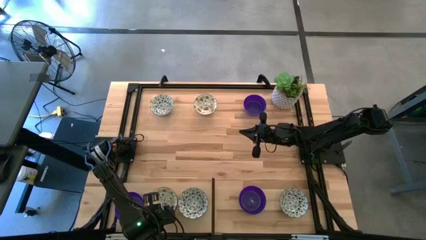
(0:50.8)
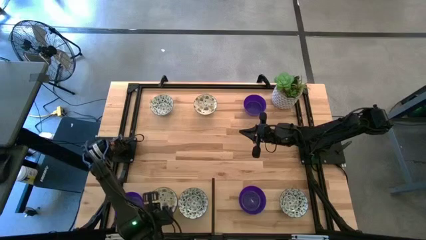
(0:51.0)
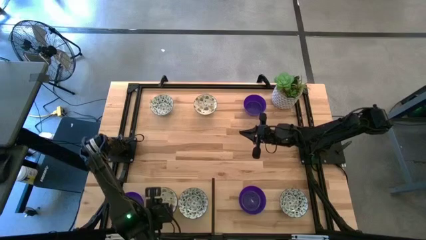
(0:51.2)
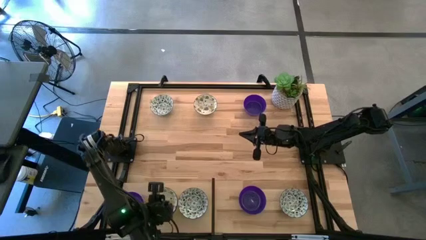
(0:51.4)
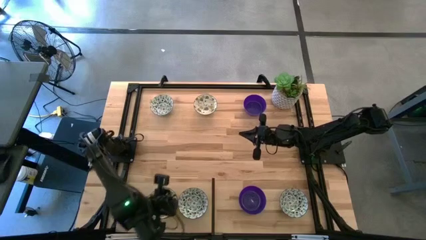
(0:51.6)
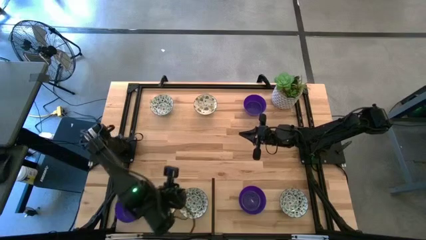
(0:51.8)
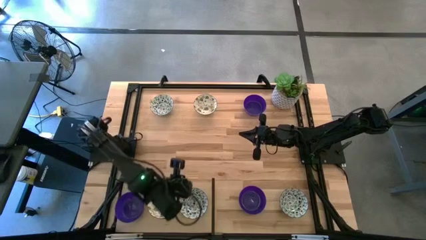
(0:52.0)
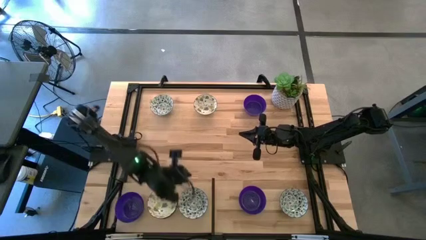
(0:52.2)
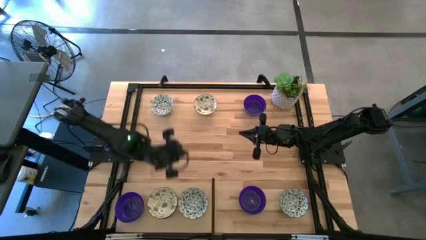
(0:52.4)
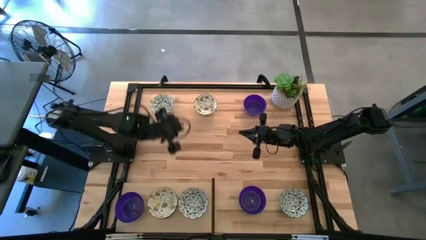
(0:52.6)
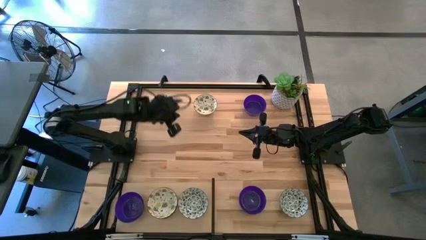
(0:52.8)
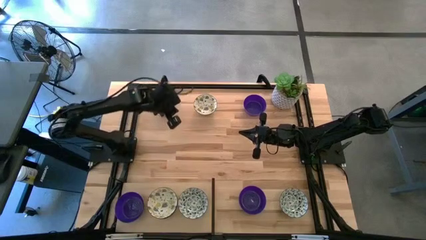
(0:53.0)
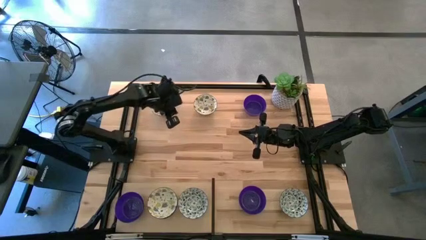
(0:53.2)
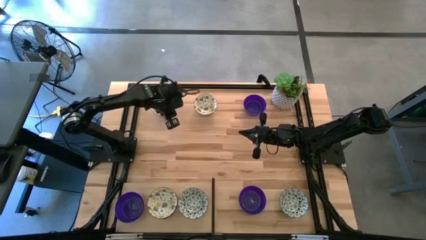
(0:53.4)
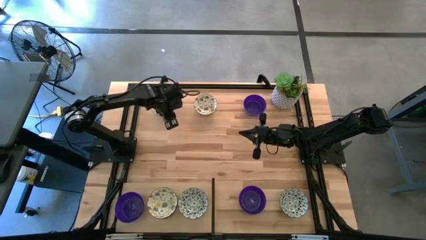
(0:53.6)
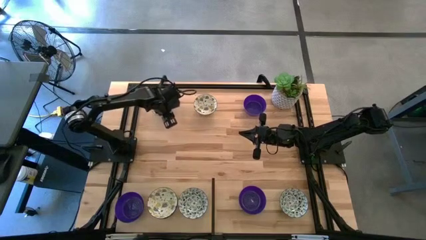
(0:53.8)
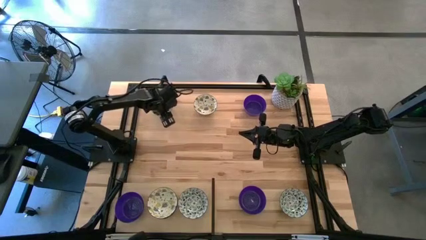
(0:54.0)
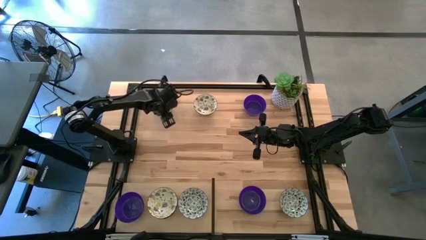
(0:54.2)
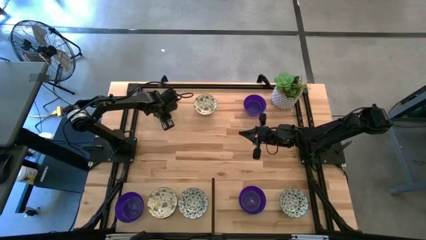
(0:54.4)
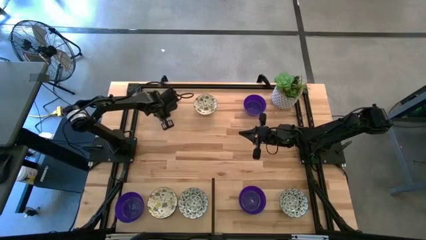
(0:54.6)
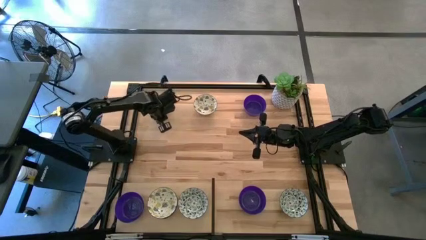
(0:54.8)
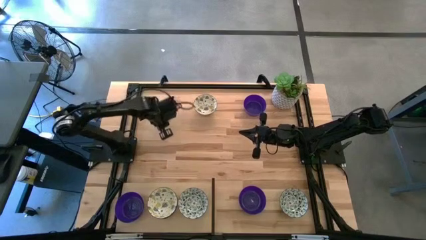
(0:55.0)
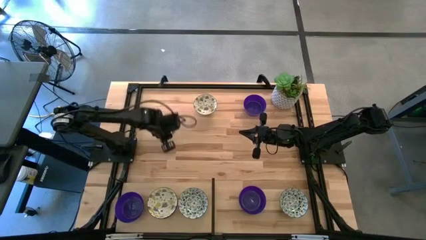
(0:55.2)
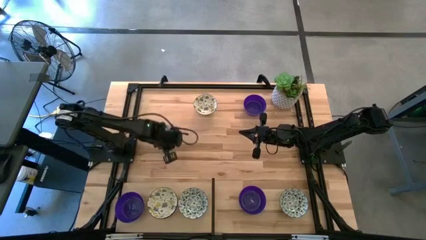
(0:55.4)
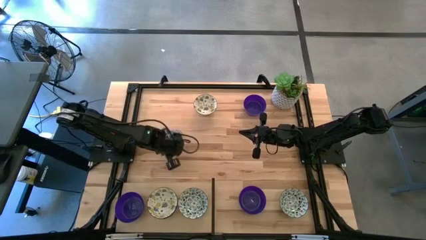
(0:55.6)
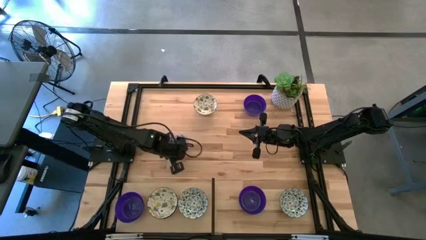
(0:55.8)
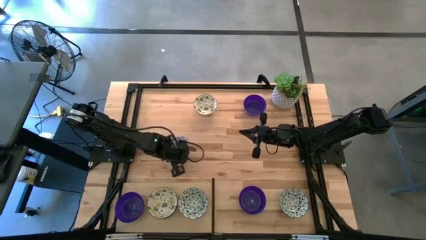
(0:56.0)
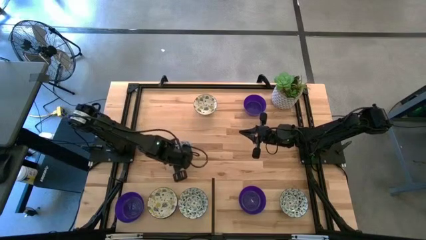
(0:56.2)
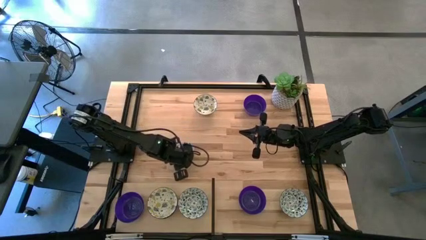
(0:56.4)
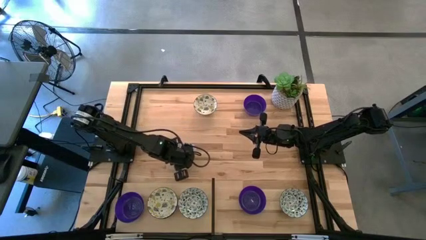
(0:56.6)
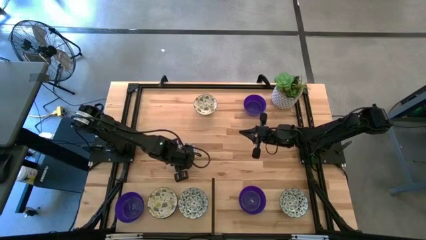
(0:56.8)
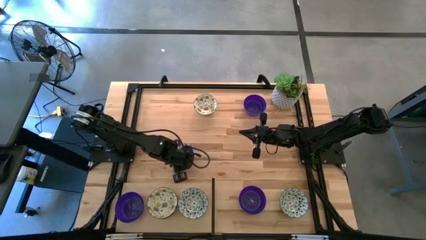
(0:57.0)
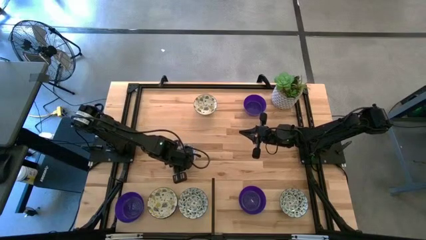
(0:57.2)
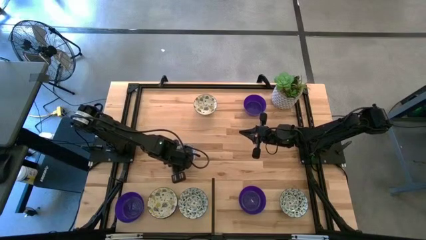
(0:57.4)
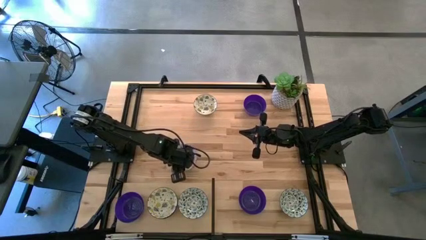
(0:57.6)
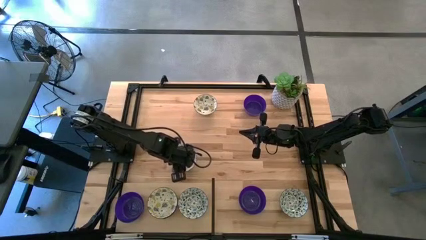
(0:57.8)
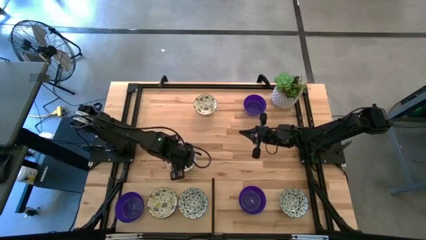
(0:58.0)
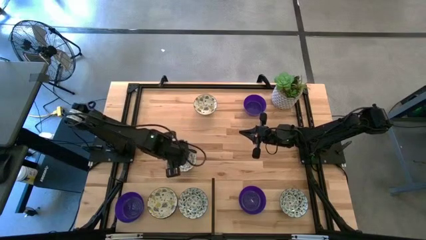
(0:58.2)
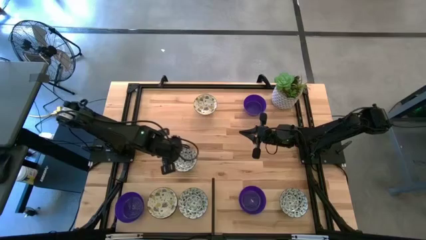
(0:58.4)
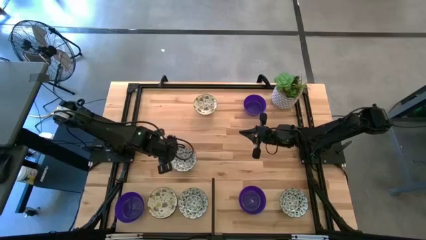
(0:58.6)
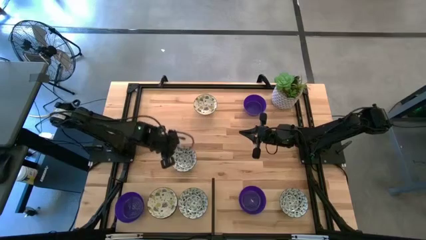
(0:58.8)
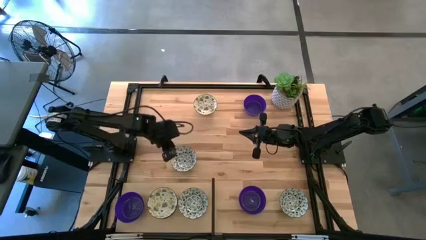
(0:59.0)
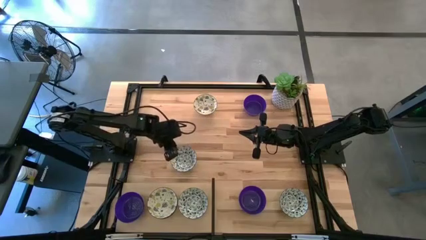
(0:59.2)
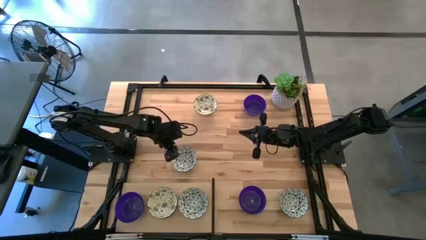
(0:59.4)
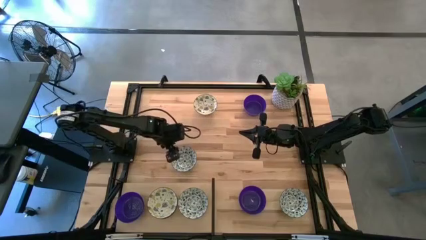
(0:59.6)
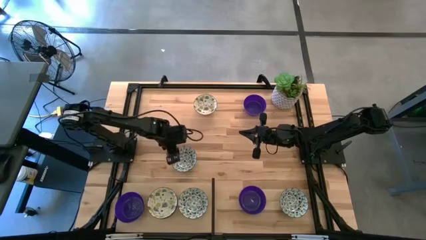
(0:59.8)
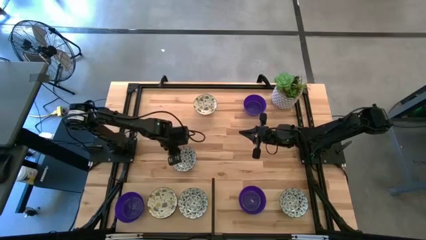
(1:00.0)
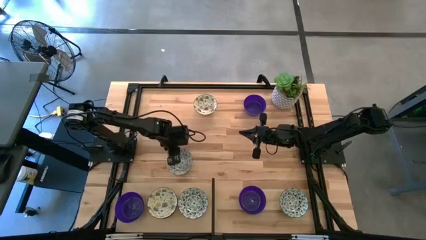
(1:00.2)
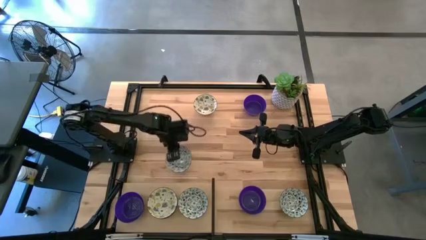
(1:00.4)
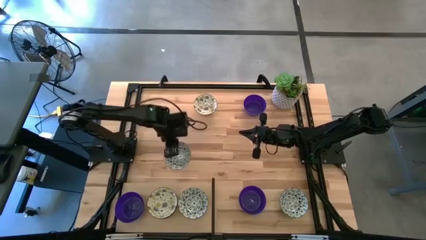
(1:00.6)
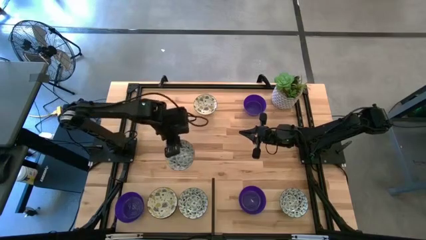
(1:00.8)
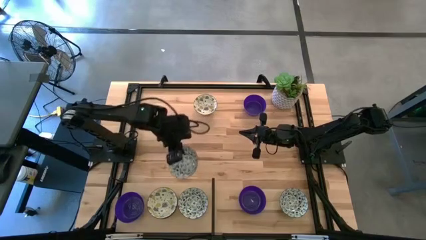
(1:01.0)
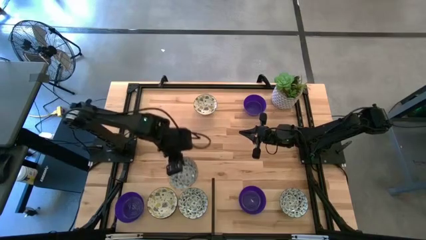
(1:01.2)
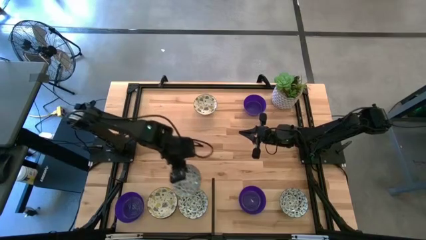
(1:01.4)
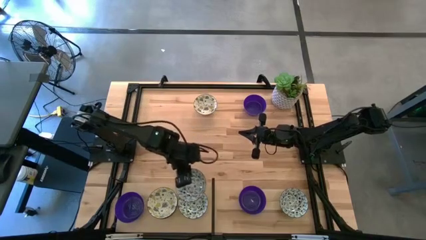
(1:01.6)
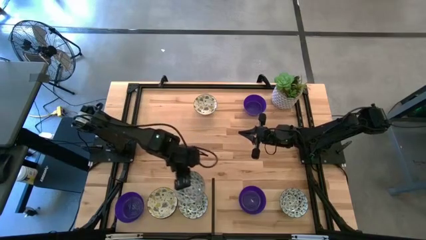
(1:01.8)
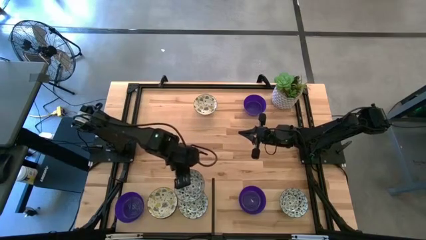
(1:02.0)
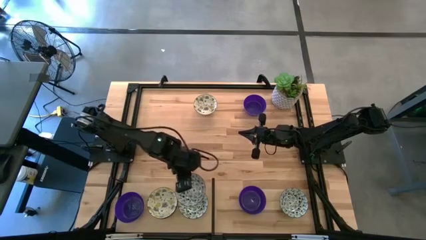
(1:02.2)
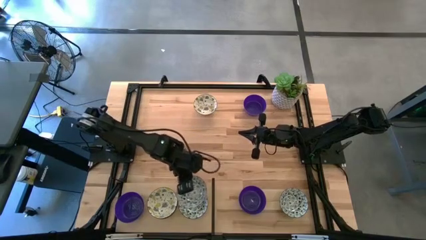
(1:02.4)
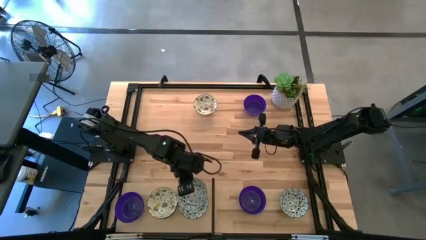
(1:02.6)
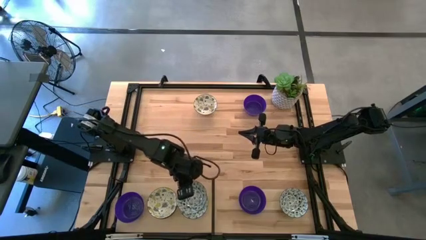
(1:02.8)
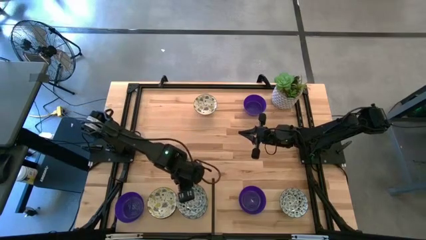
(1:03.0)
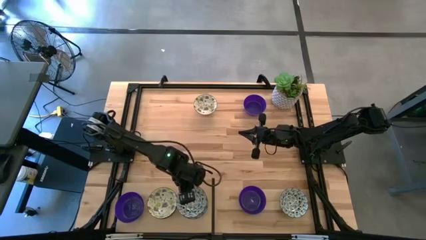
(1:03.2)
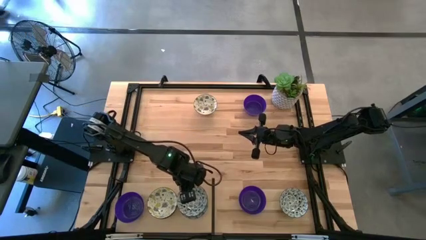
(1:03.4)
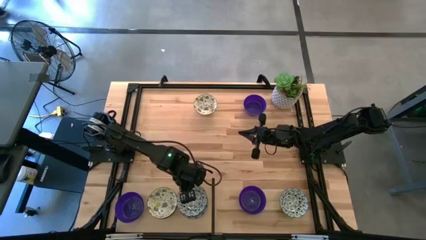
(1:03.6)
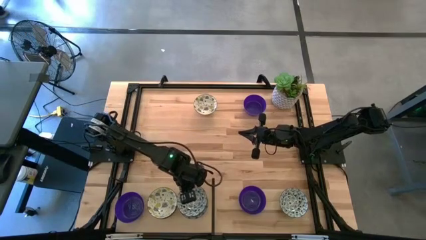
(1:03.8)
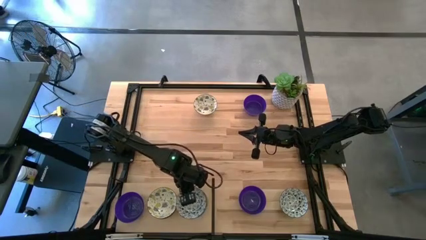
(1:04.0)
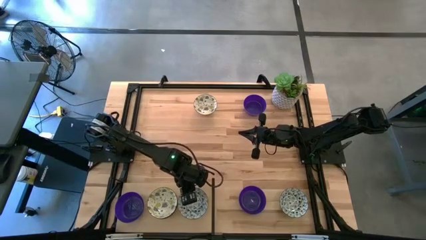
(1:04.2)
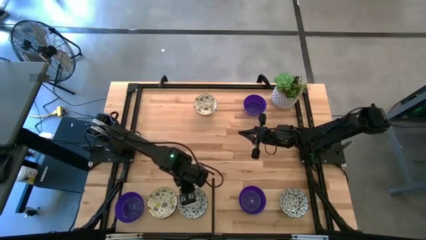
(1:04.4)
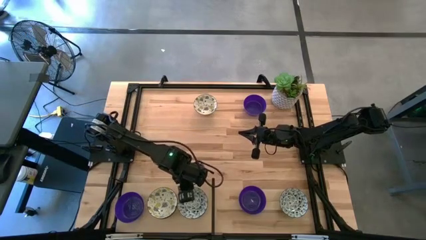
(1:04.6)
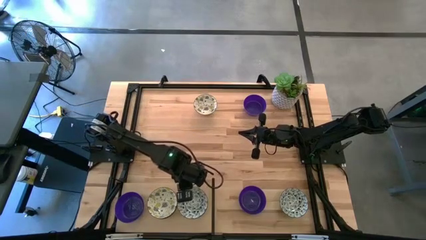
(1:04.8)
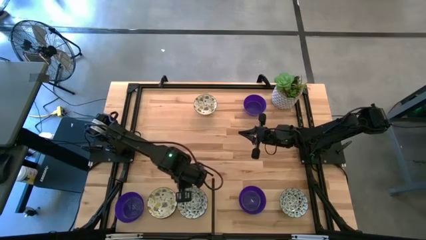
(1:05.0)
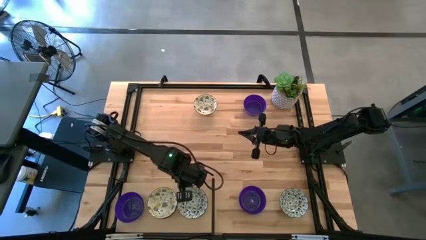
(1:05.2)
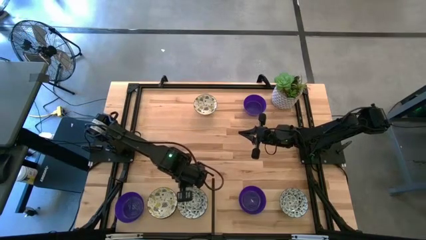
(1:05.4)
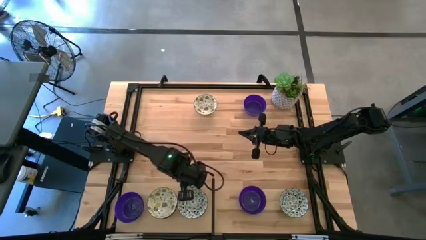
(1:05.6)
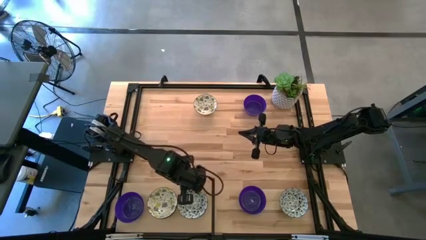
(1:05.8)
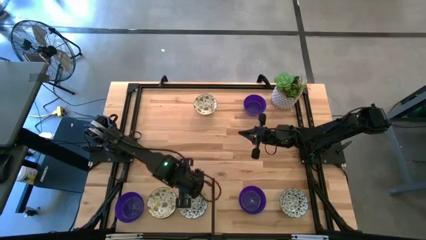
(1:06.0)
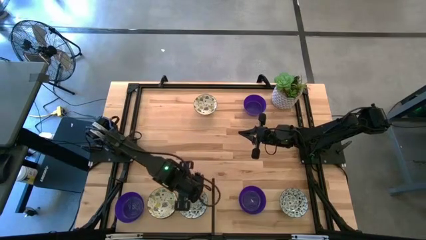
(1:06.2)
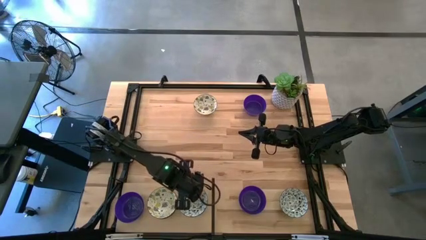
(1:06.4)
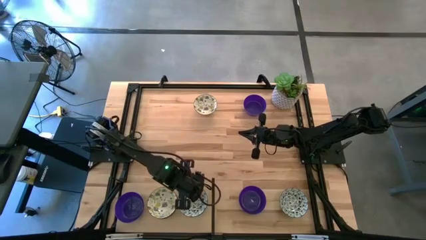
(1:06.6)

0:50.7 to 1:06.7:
Task: Pick & Place Mini bowls
Stack the top blue patterned bowl on top of the other blue patterned bowl on the shelf
